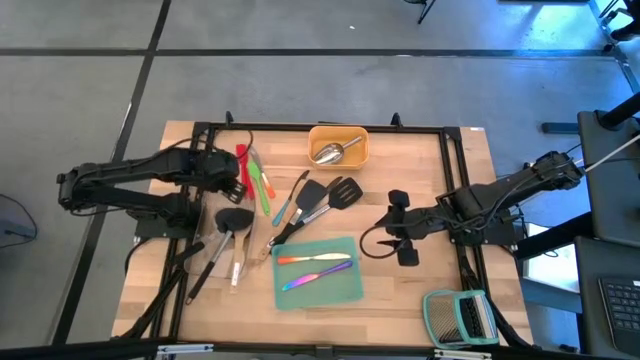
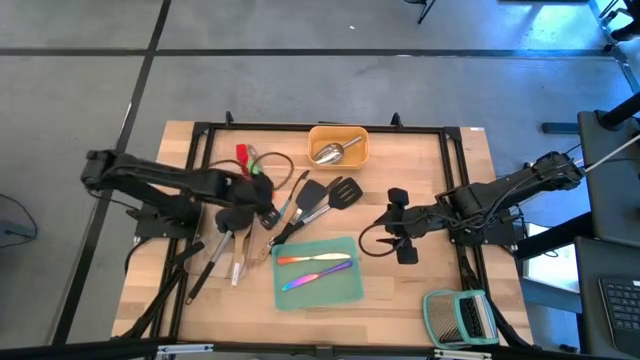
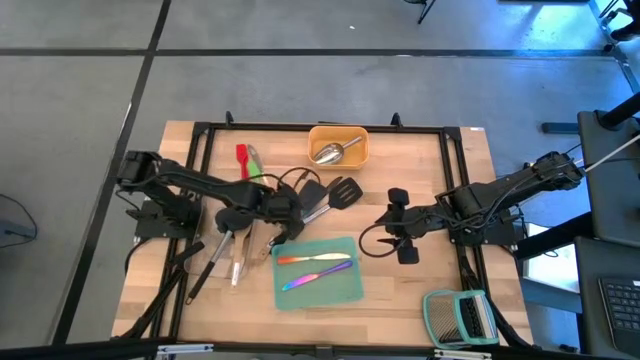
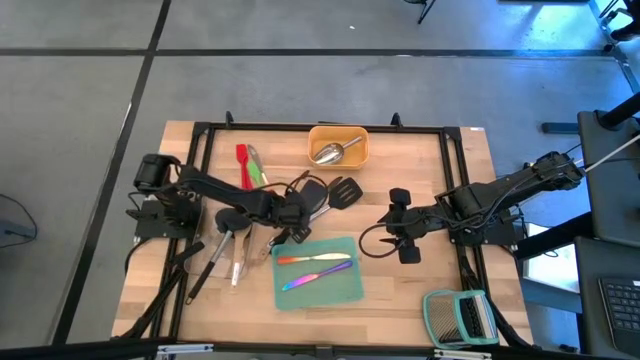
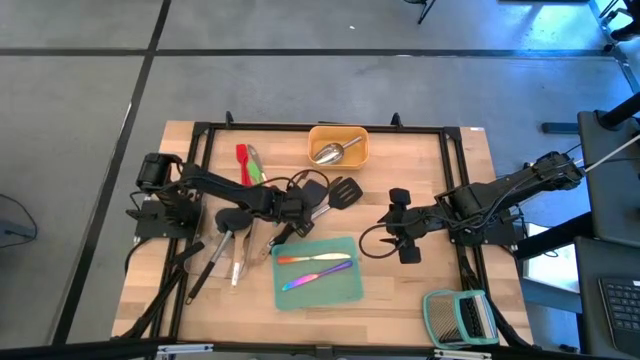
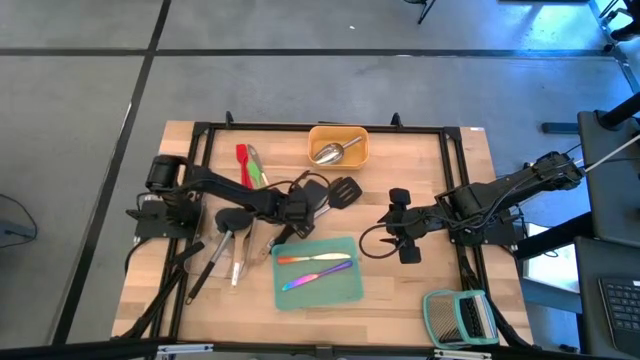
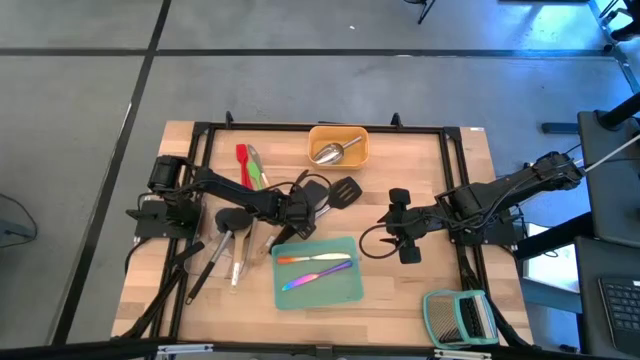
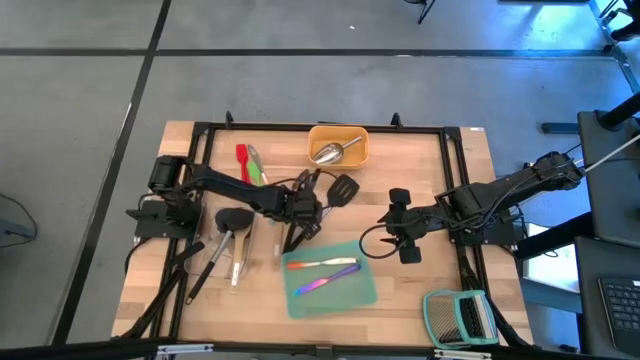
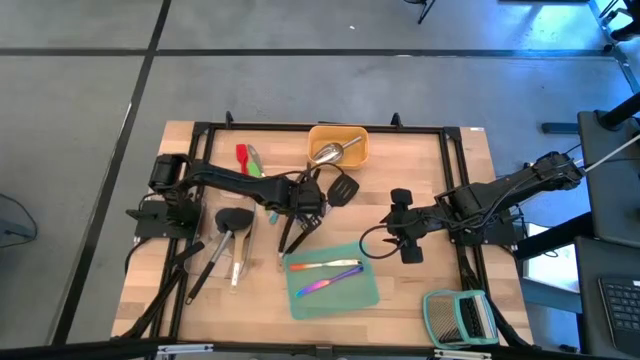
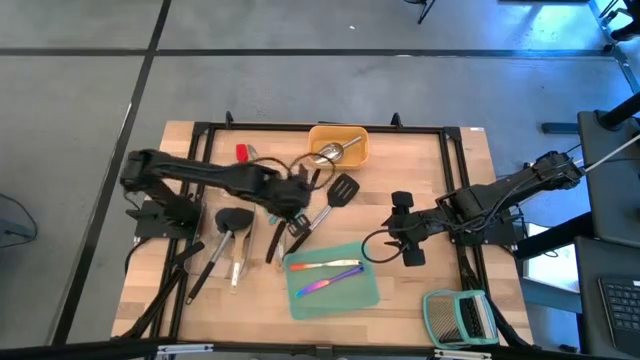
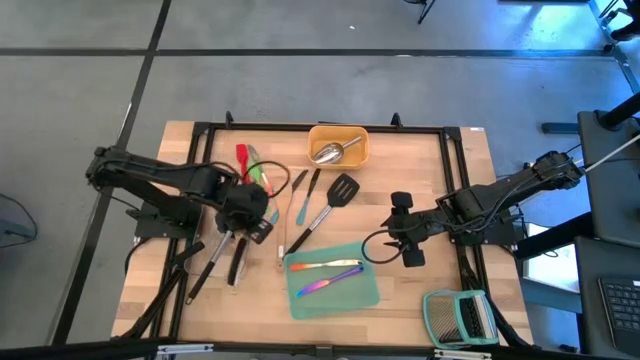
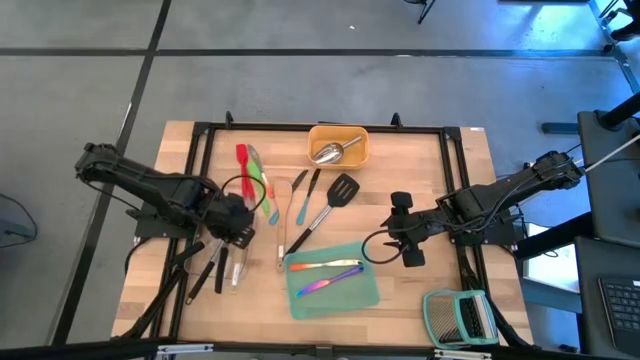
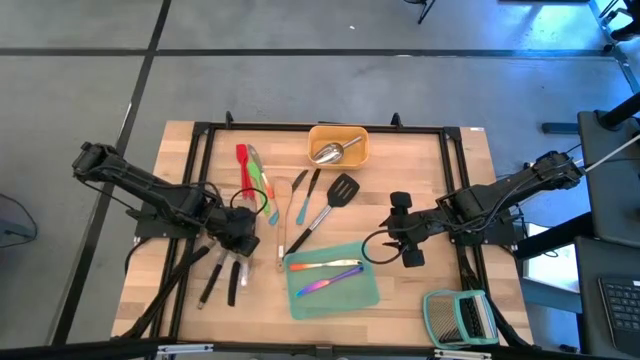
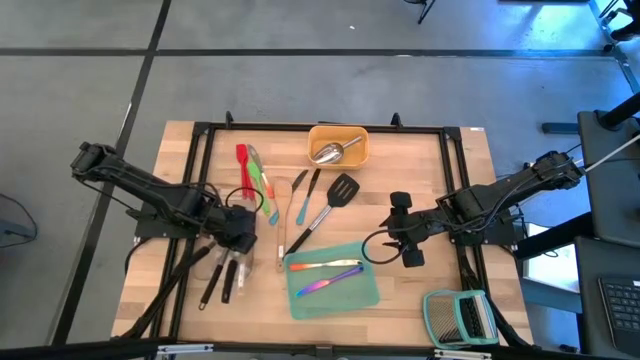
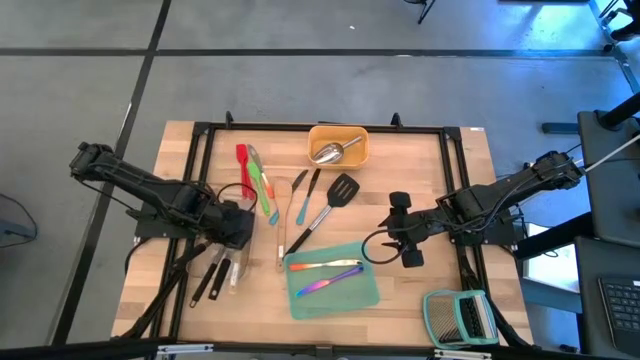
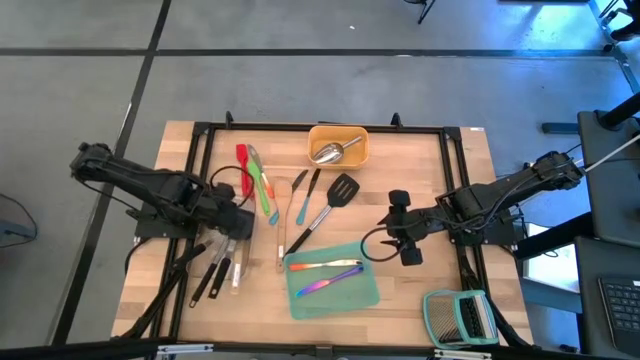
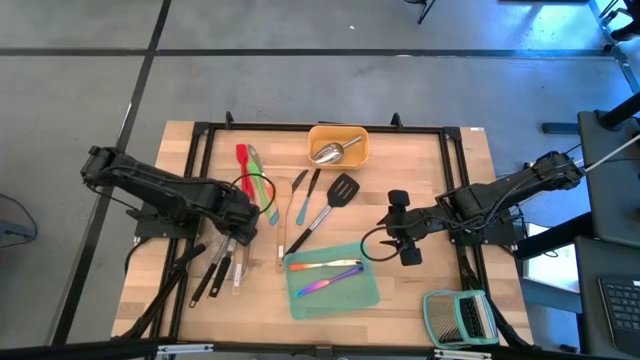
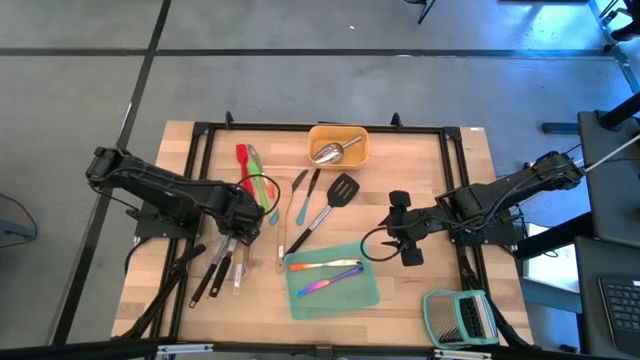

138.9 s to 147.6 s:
Task: Pick & Place Kitchen Items
Put the black spatula into the transparent bin

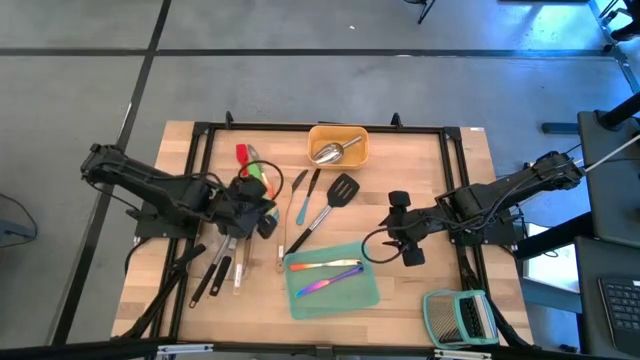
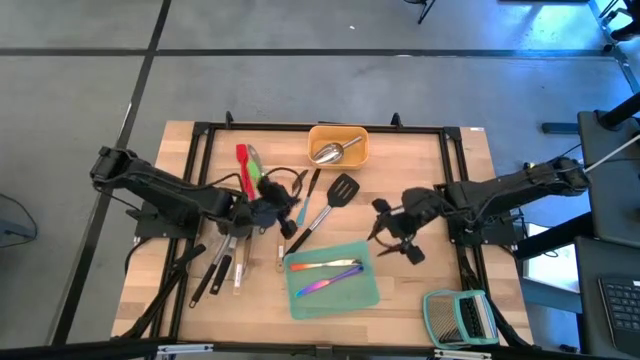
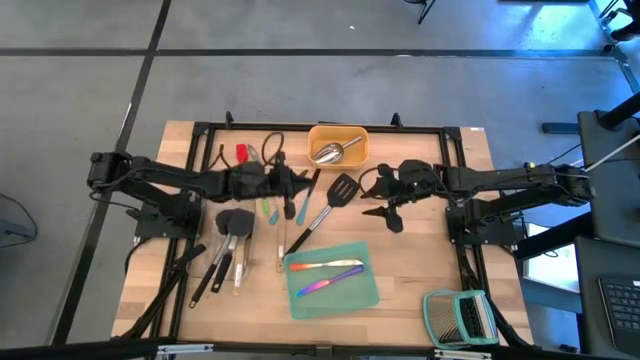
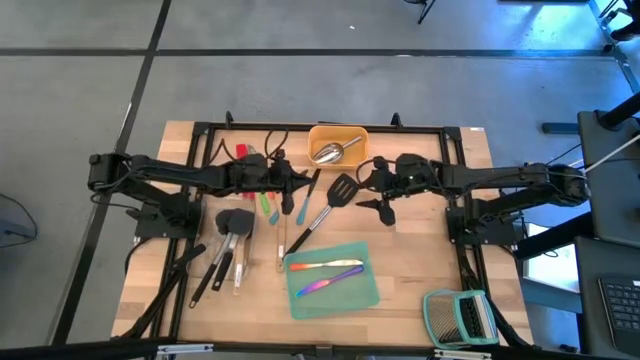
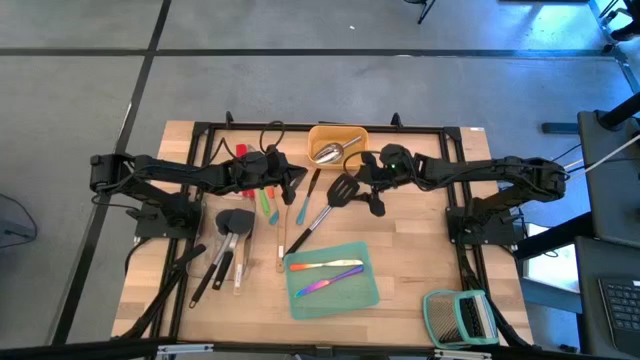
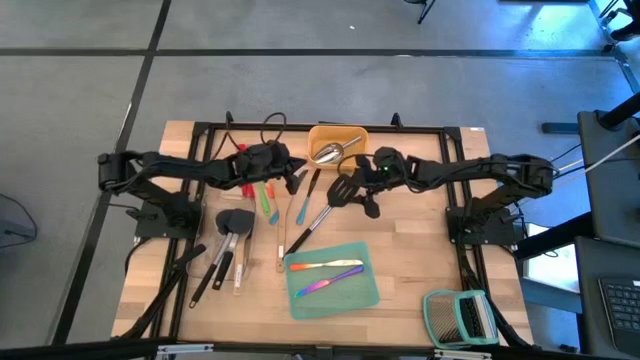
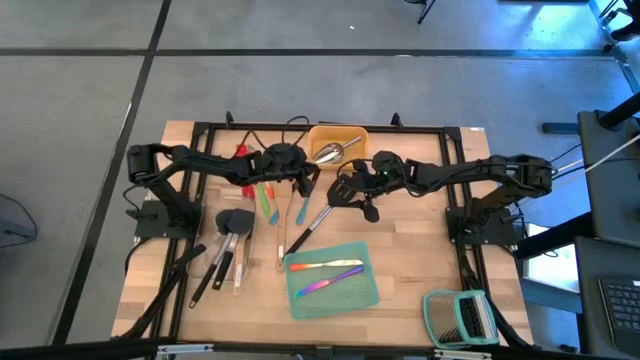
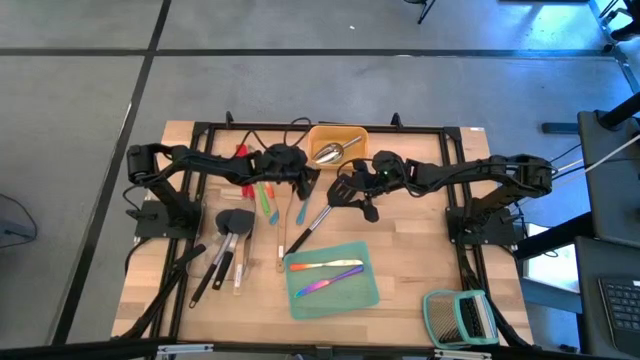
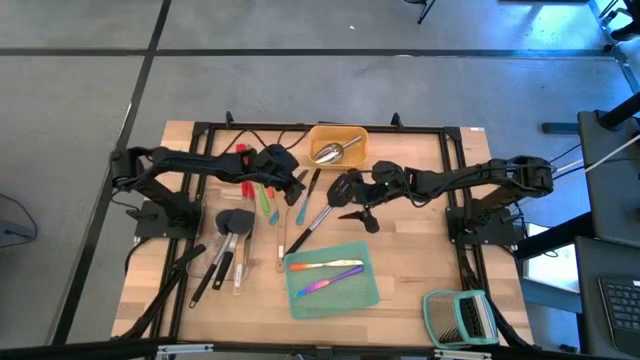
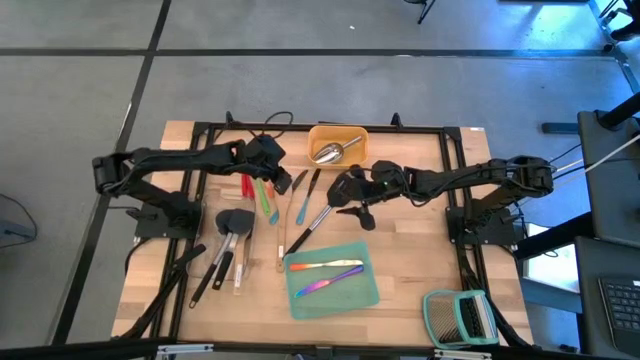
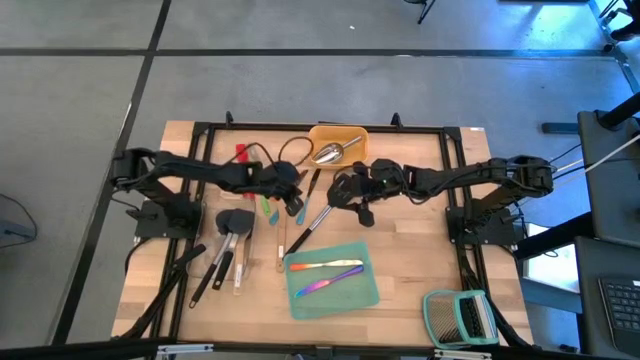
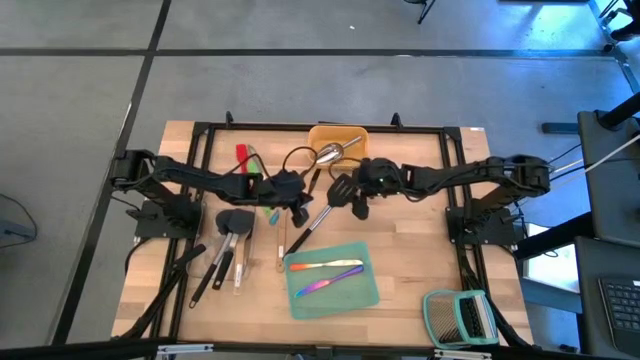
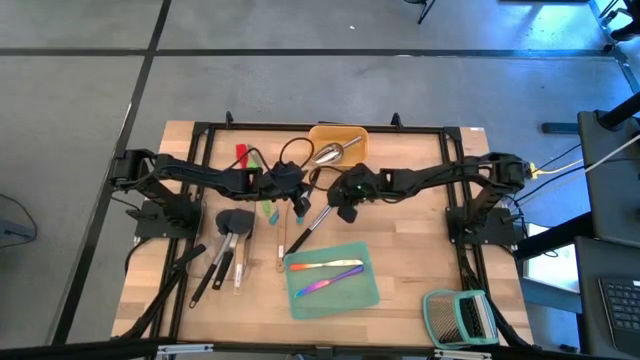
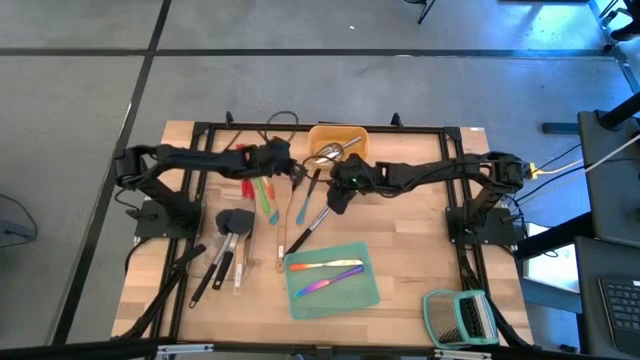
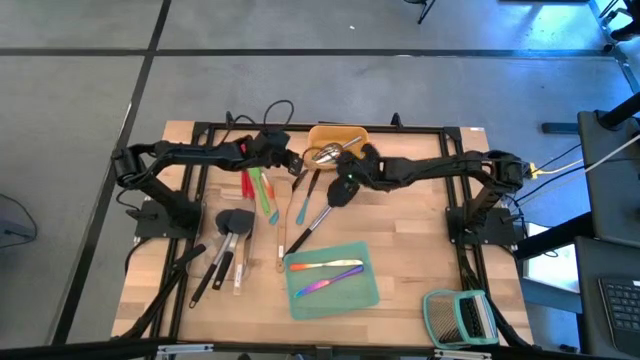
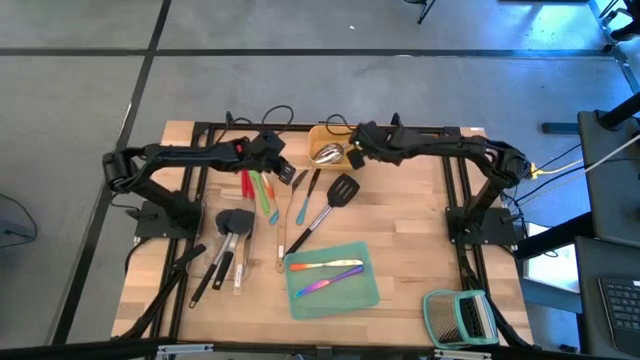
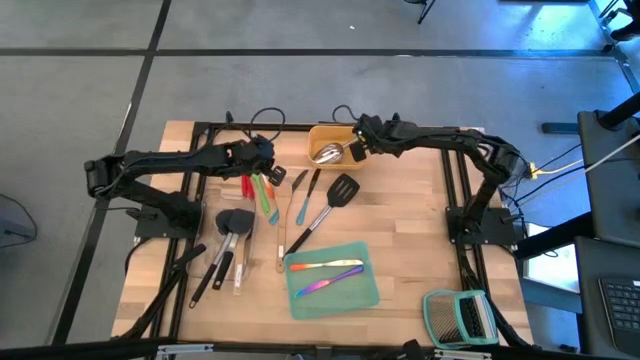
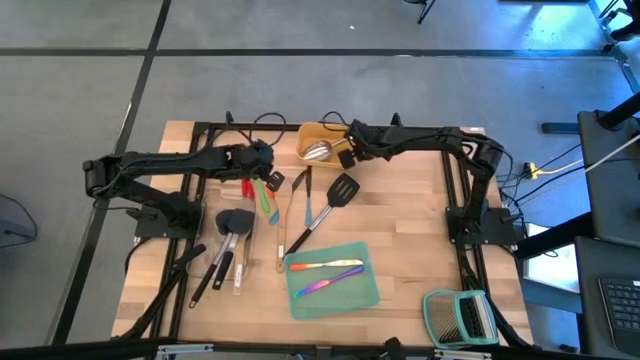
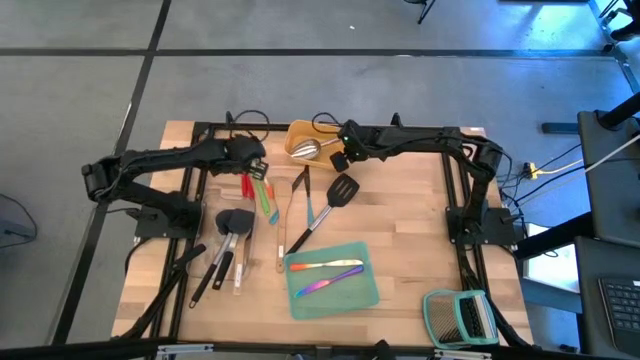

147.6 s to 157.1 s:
Adjust the yellow bin

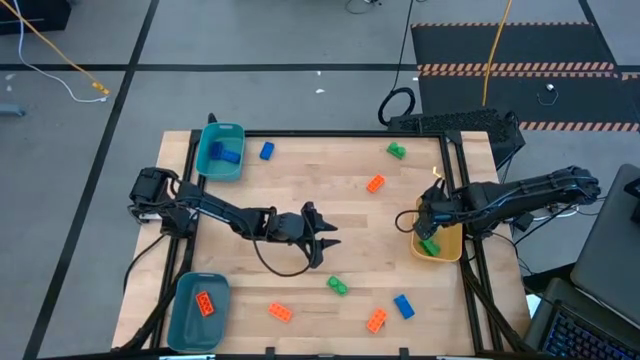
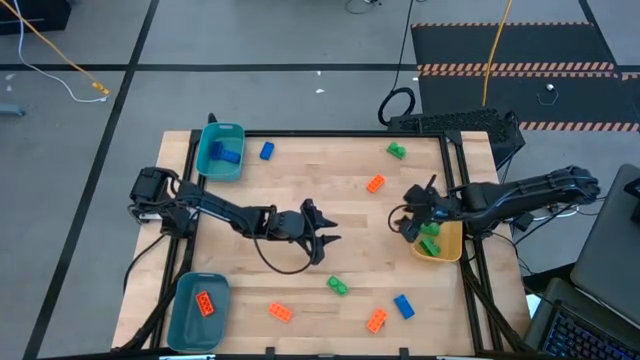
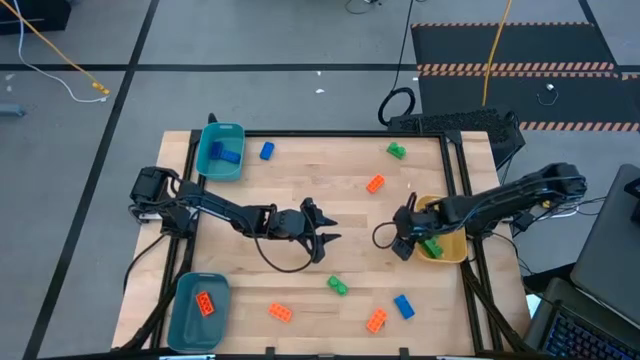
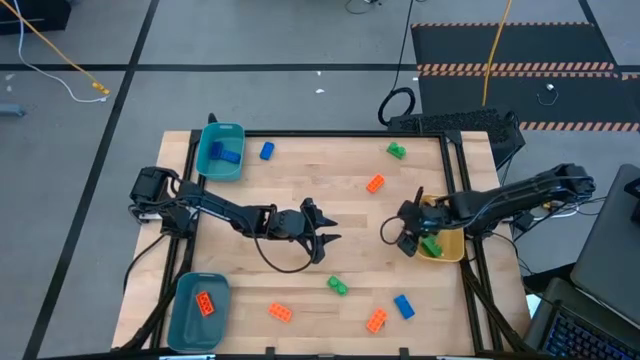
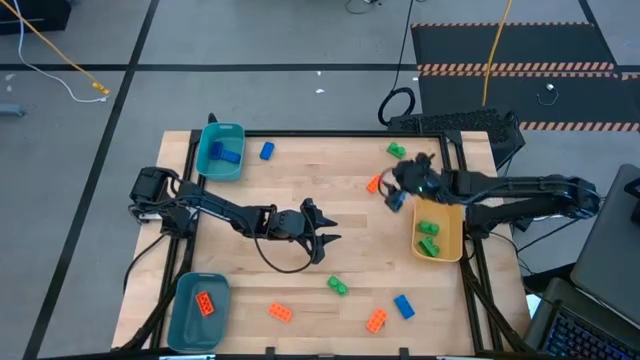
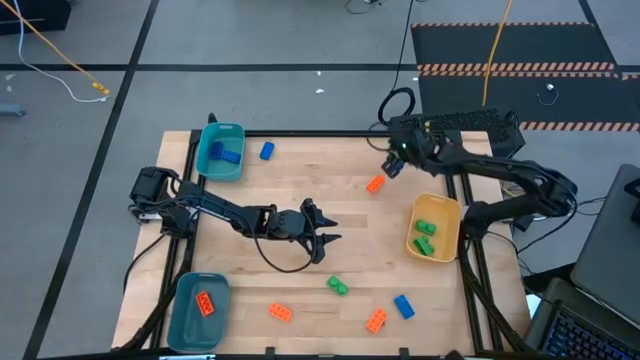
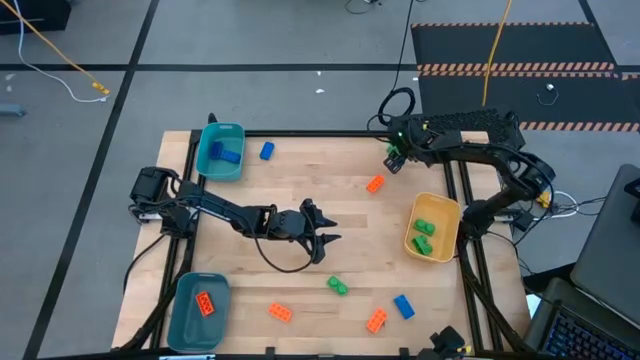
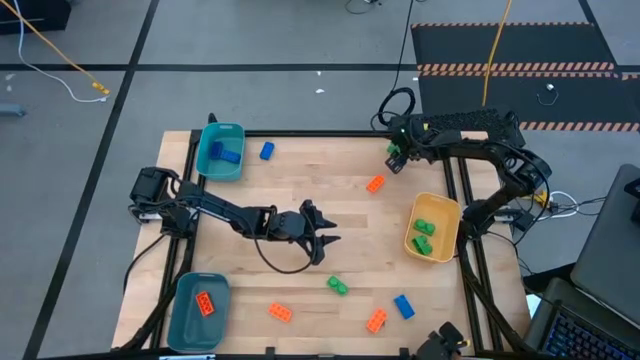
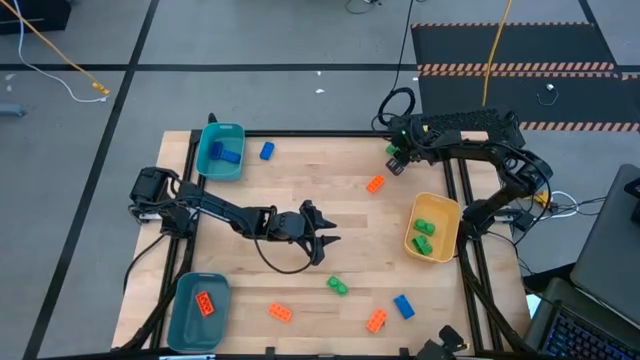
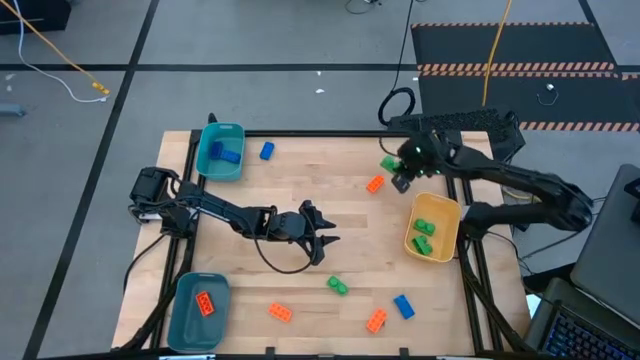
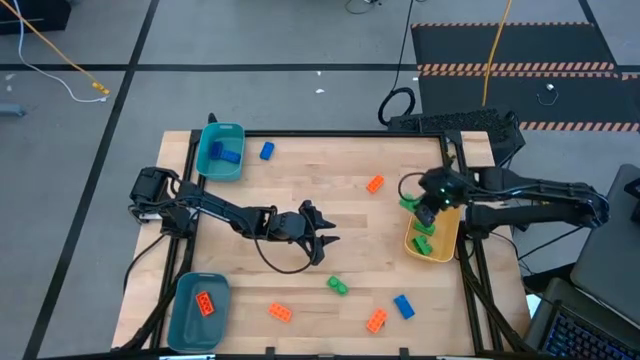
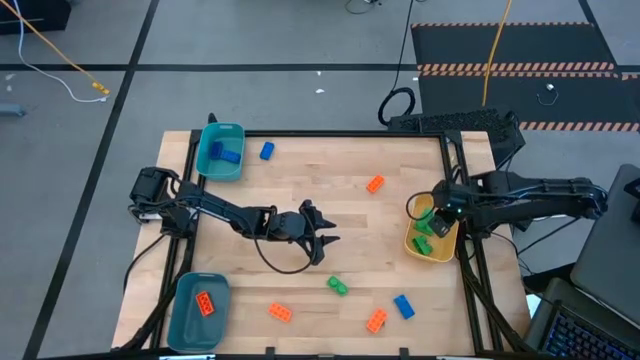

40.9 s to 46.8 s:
Task: Sort & place blocks by color
Put the green game piece into the yellow bin
